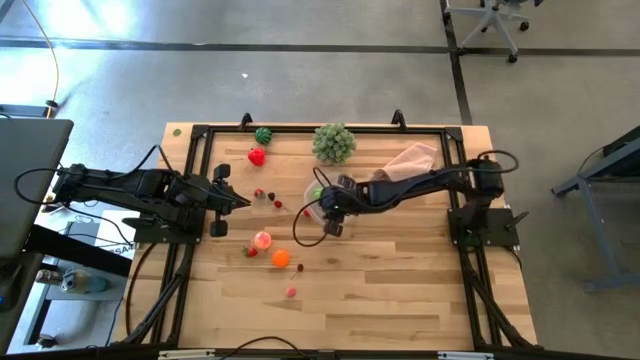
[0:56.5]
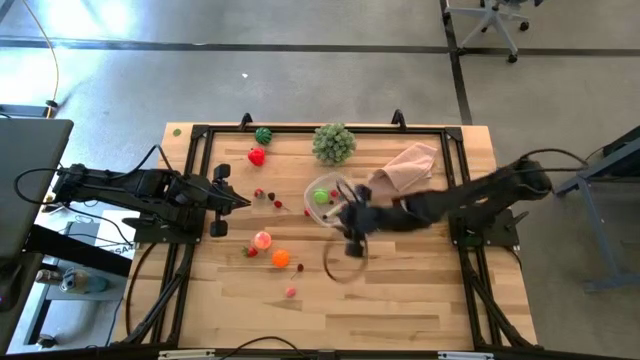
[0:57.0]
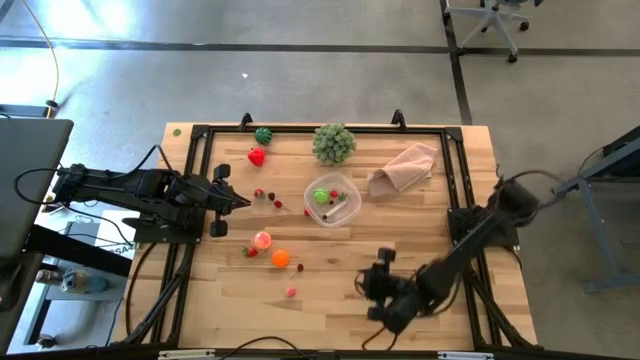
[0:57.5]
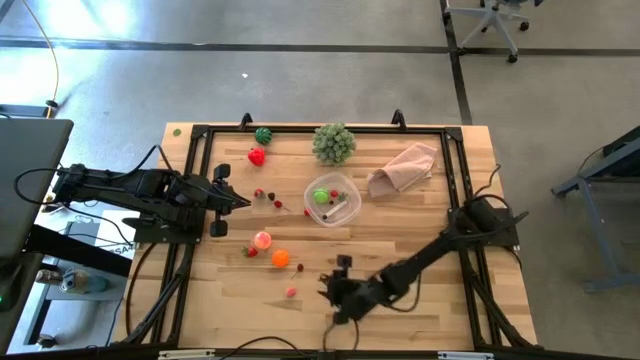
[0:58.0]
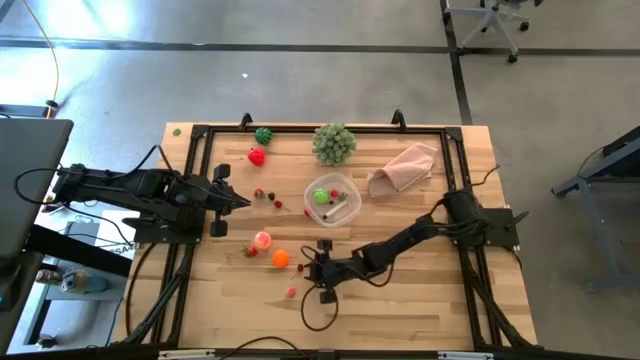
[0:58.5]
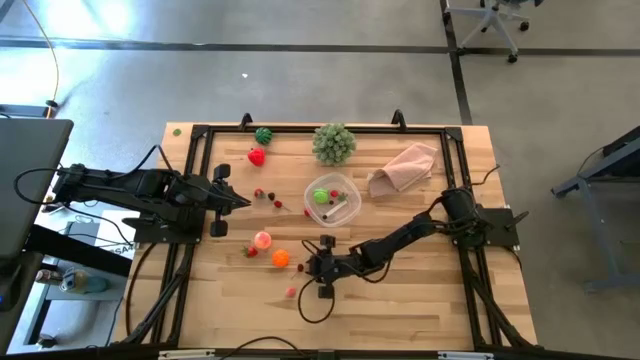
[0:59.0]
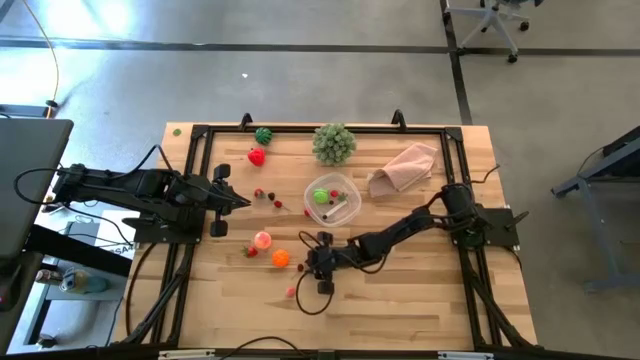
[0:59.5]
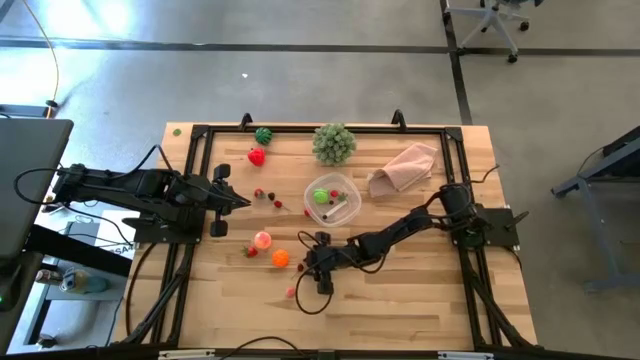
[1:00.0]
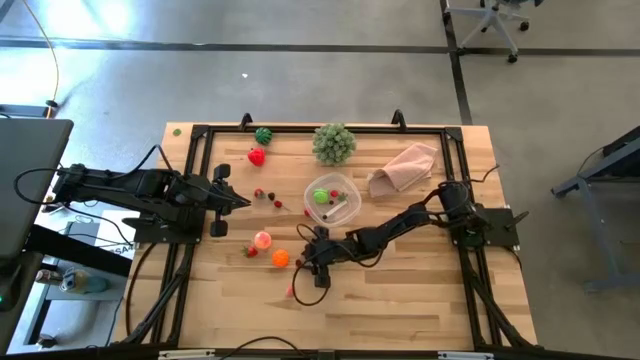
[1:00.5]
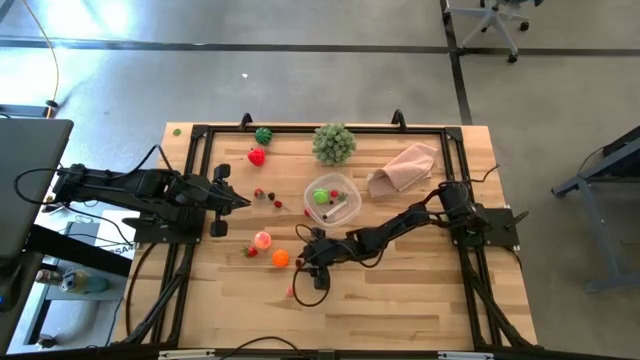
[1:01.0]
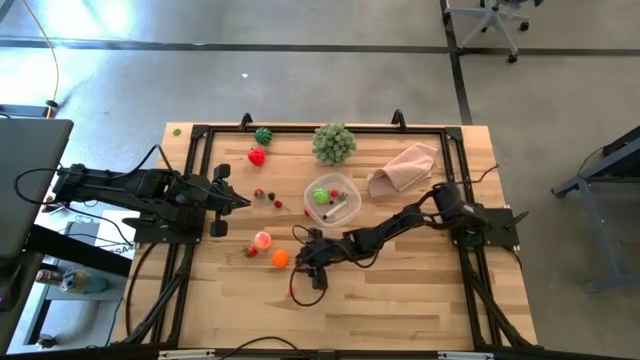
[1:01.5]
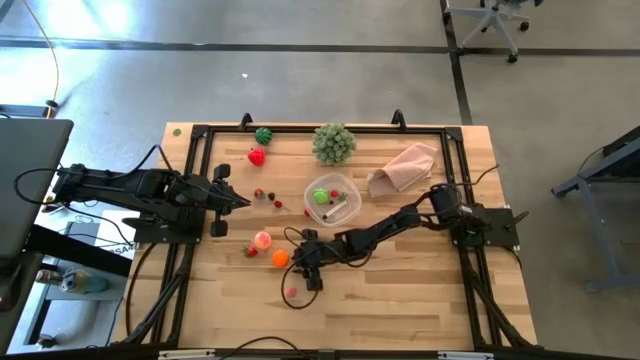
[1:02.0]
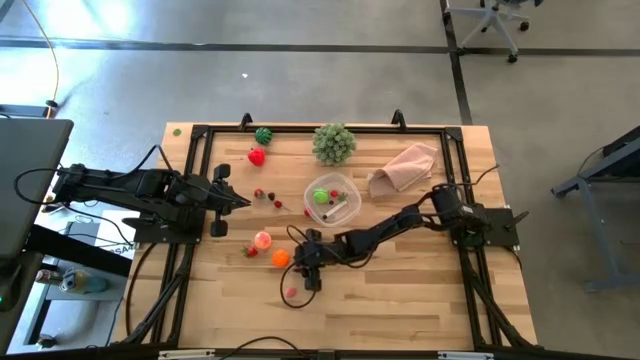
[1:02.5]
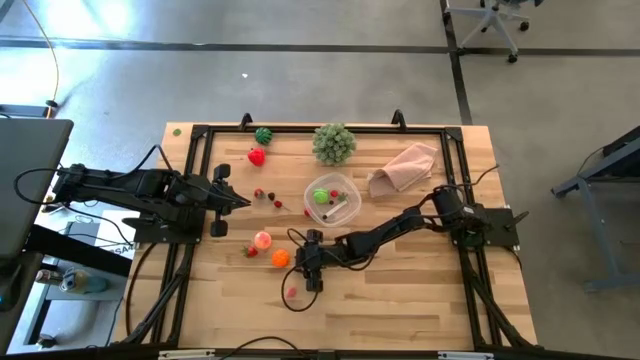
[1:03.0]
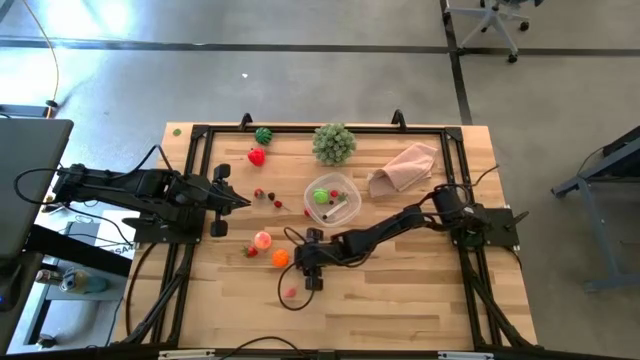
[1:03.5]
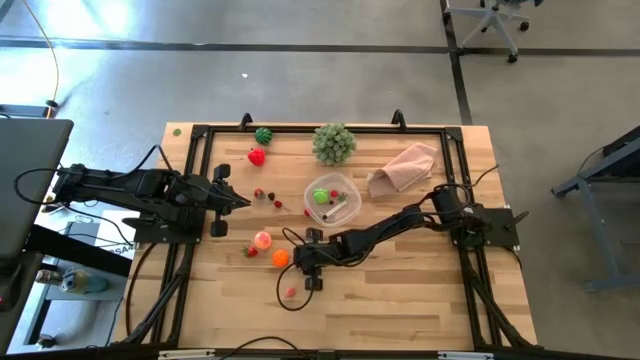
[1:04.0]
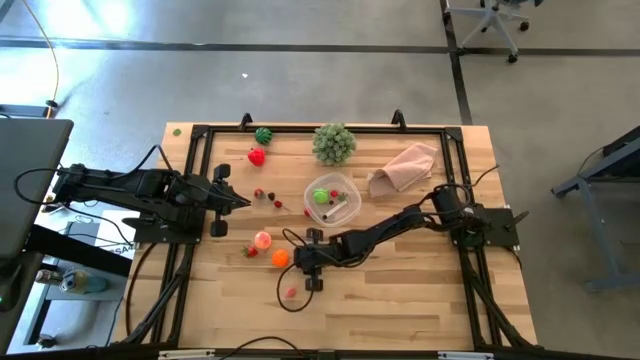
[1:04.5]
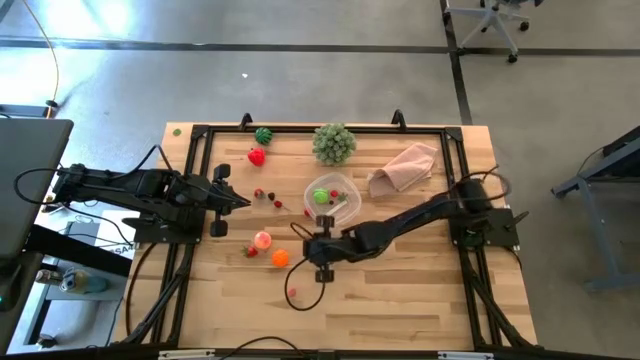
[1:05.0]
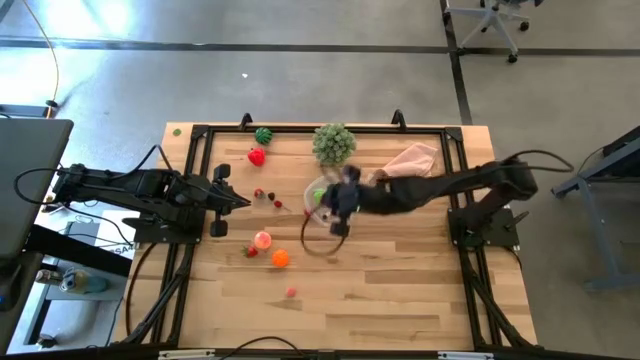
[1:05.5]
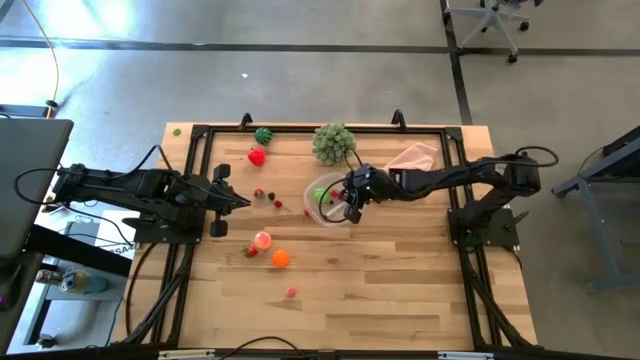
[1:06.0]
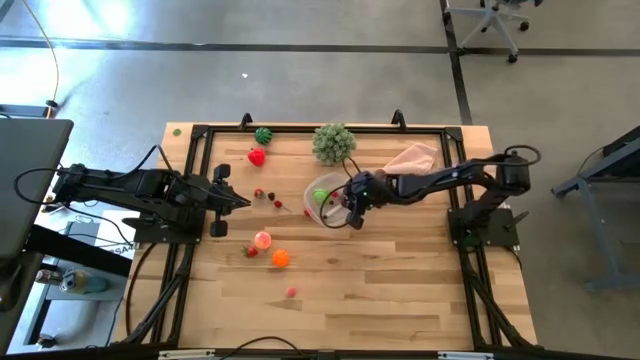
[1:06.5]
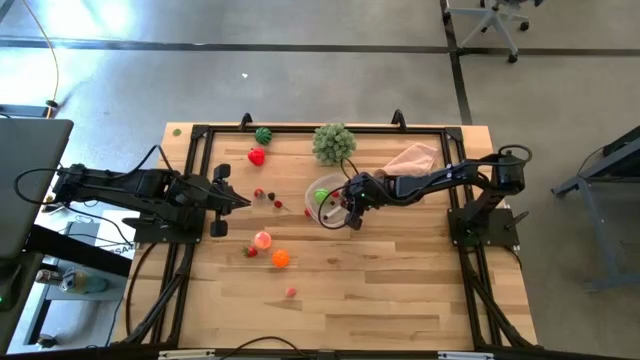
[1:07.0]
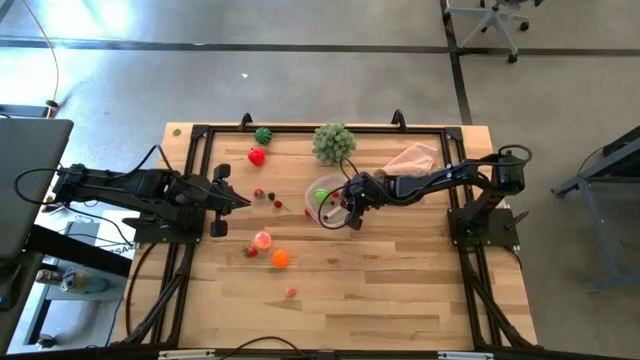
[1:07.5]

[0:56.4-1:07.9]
Task: Pick and placing Produce into tupperware
Put the bottom red cherry into the container

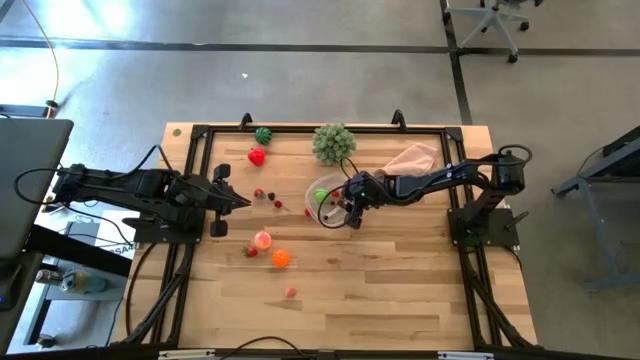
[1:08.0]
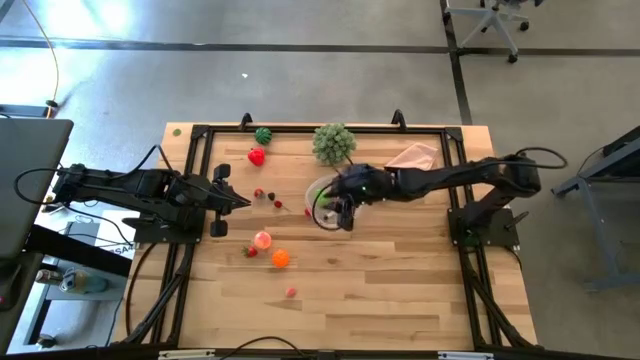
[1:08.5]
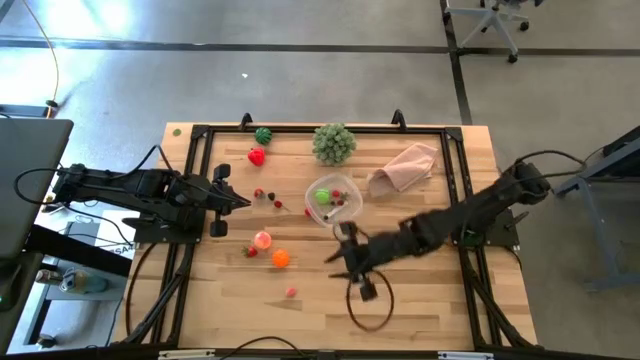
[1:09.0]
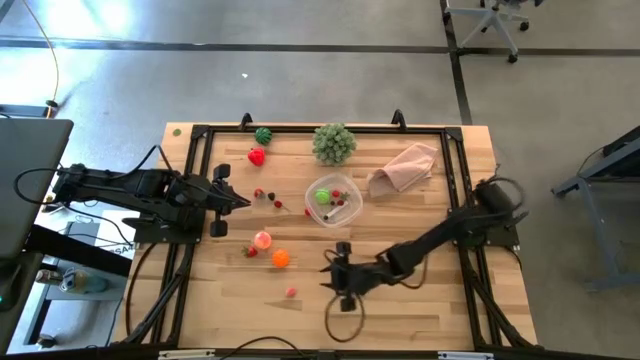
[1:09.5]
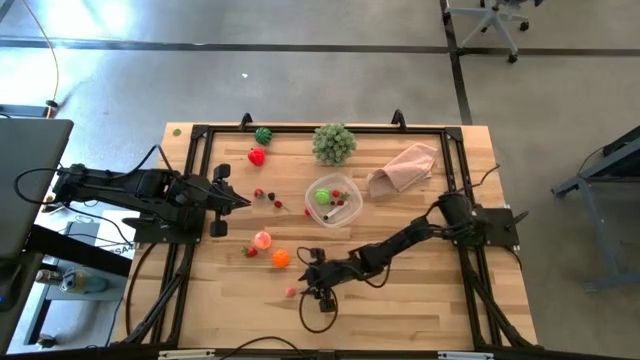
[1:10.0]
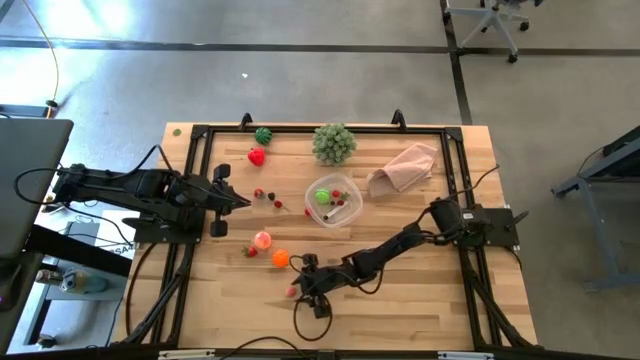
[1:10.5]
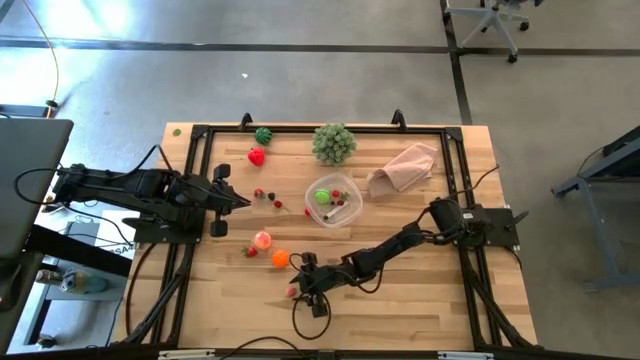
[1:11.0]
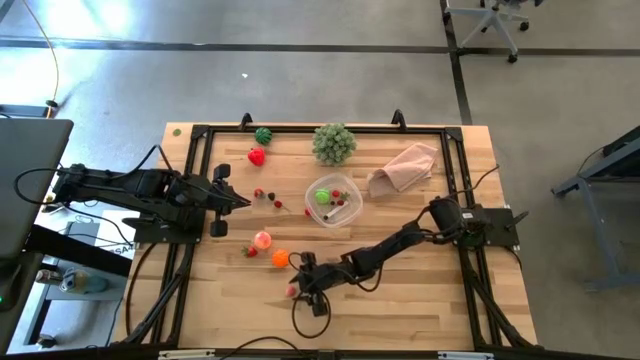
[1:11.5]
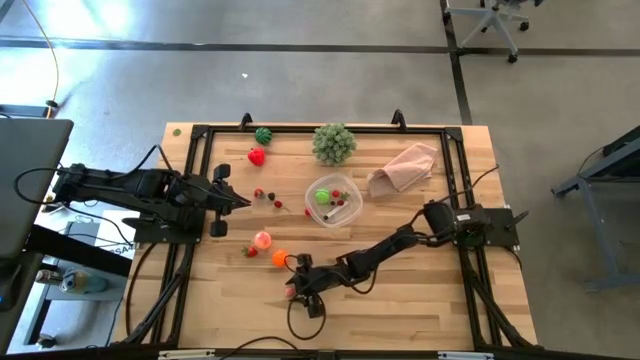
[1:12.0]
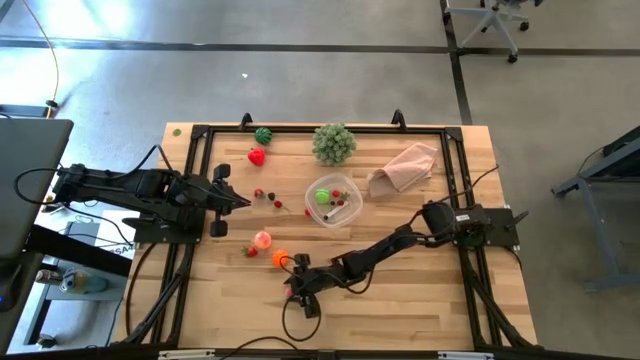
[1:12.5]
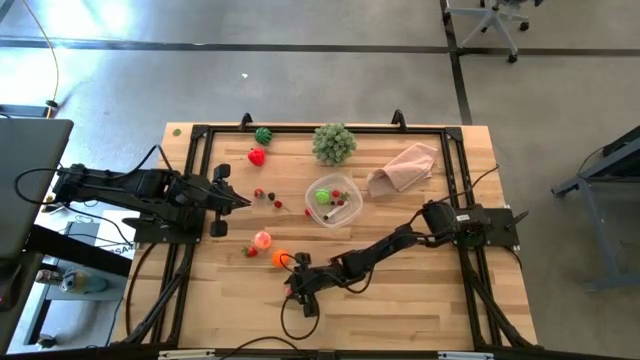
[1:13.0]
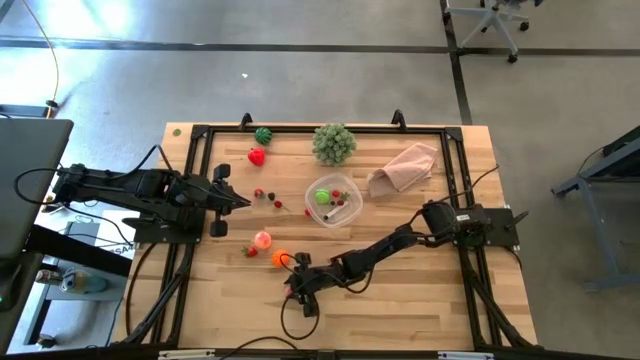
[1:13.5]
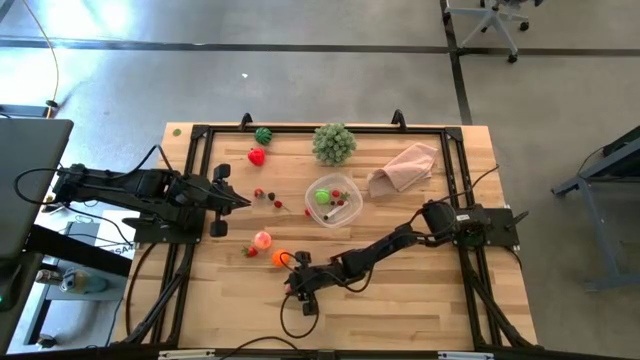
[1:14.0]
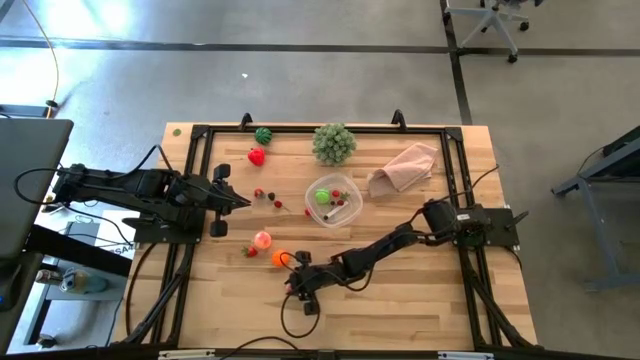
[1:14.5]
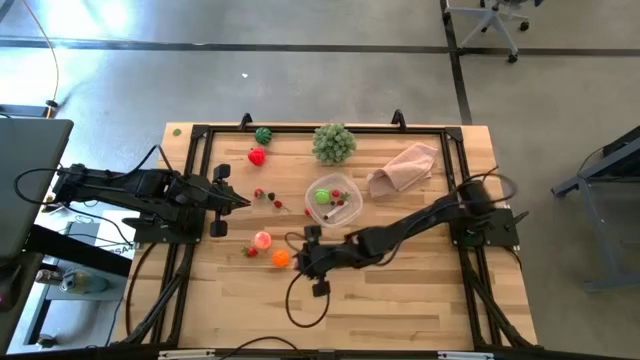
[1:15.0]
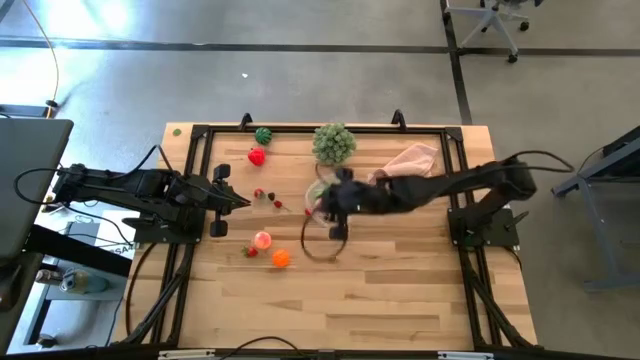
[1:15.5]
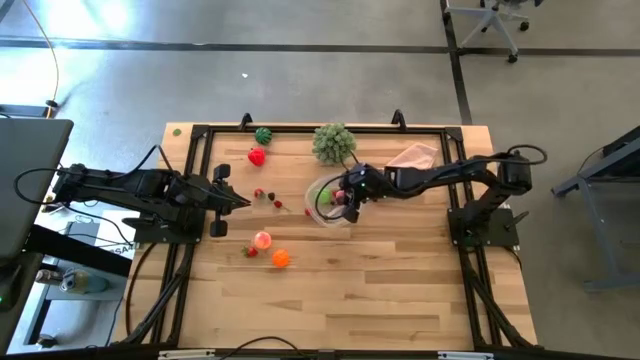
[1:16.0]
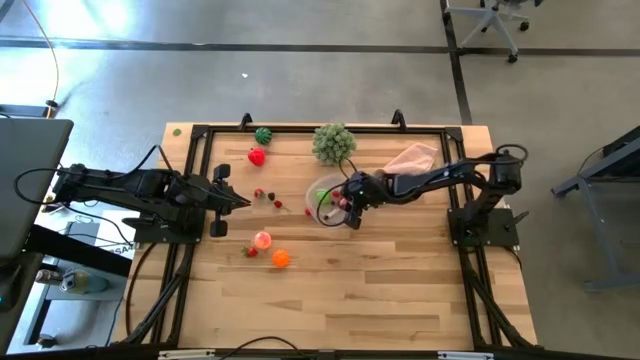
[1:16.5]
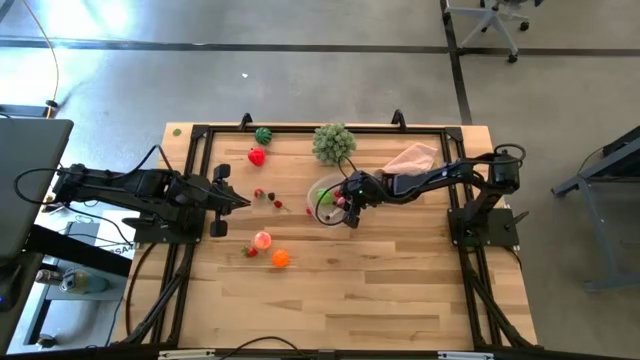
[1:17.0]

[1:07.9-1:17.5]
Put the bottom apricot into the container
